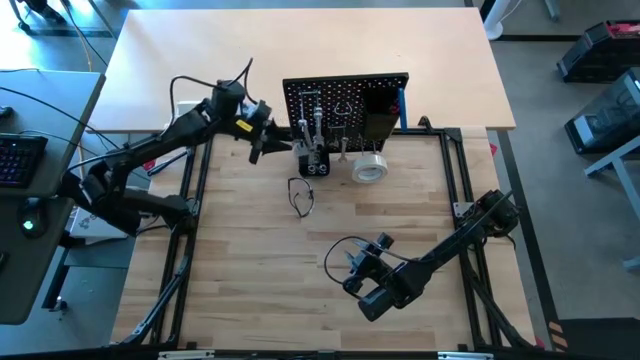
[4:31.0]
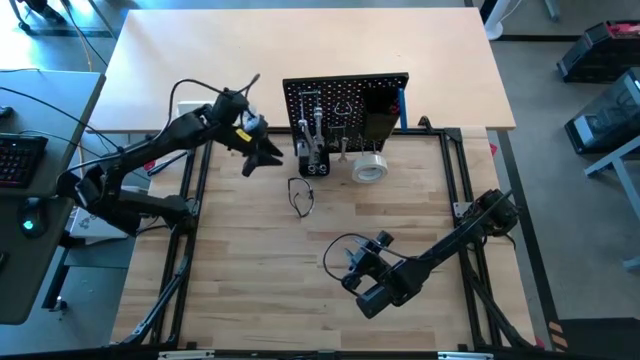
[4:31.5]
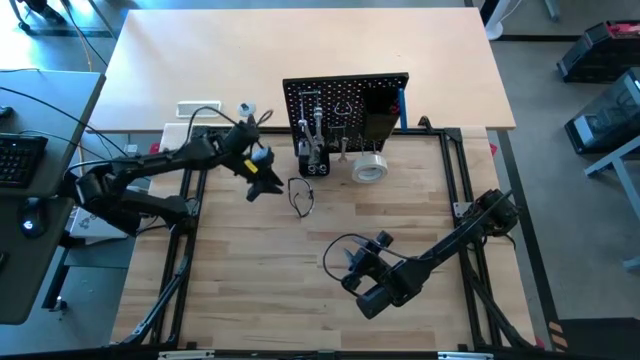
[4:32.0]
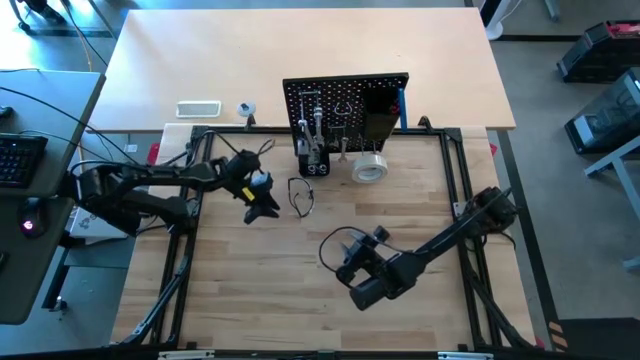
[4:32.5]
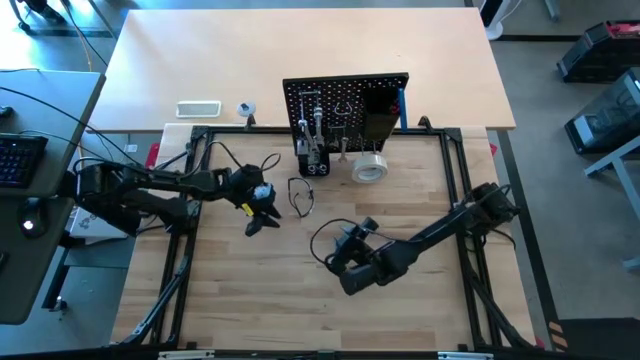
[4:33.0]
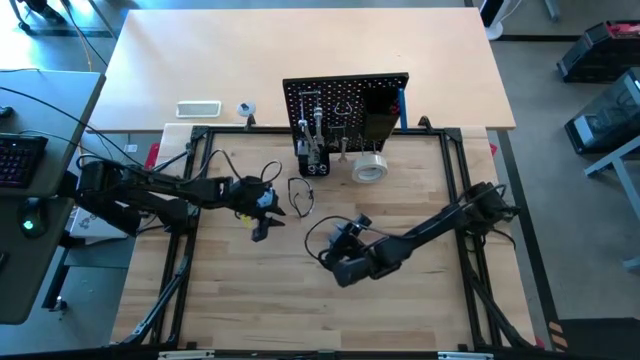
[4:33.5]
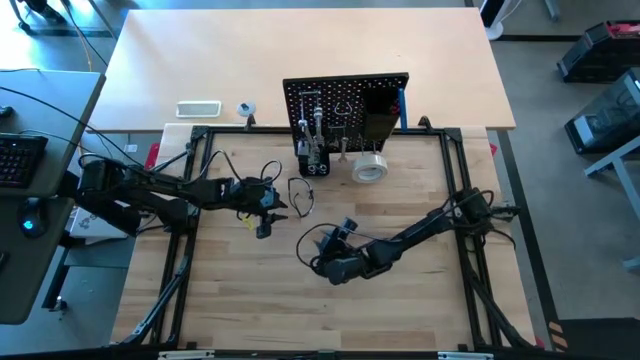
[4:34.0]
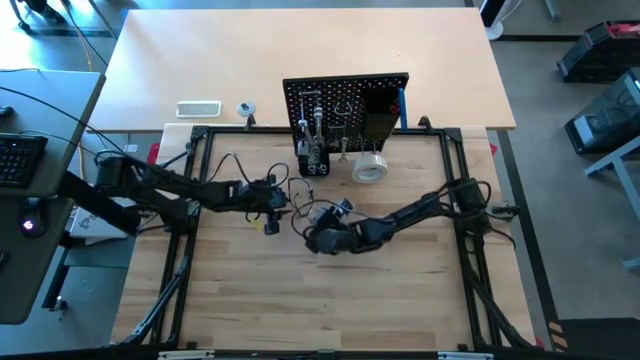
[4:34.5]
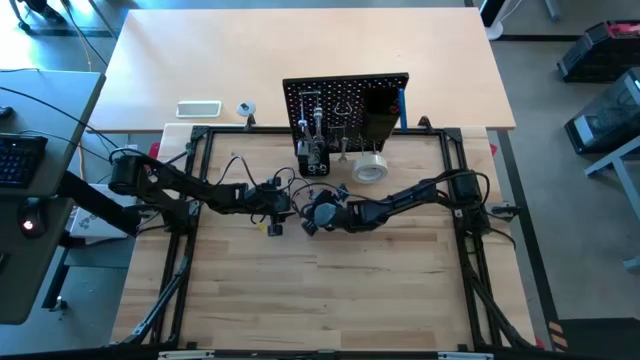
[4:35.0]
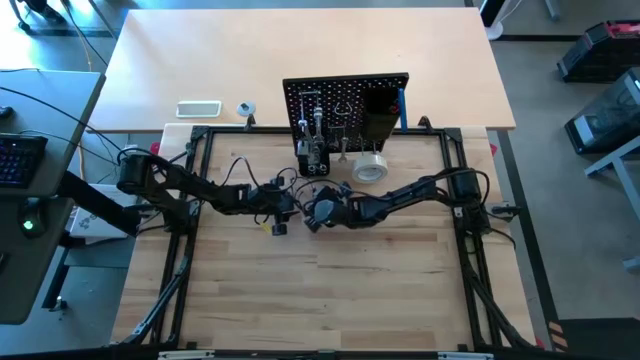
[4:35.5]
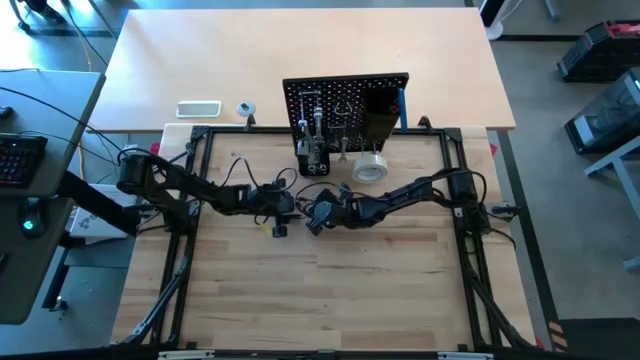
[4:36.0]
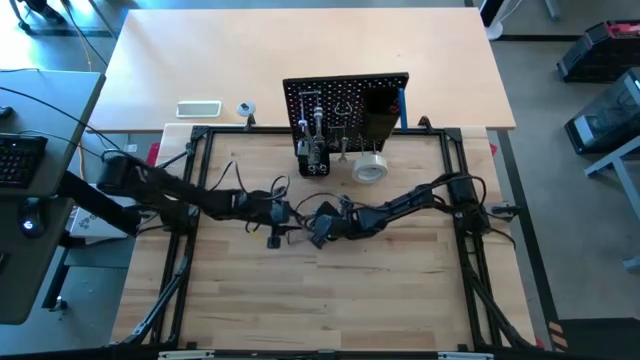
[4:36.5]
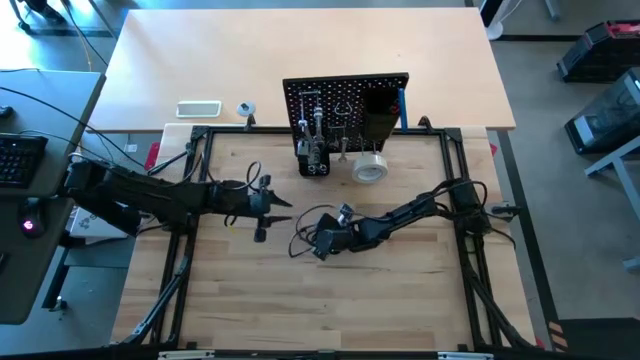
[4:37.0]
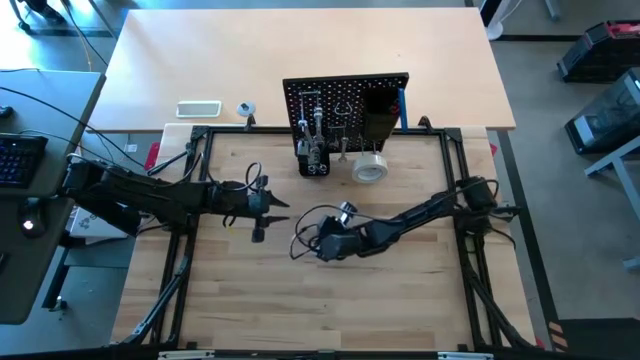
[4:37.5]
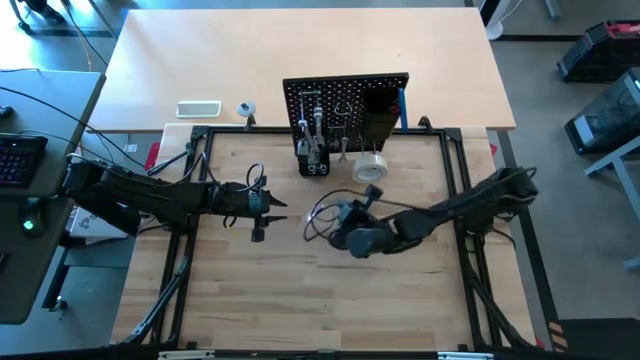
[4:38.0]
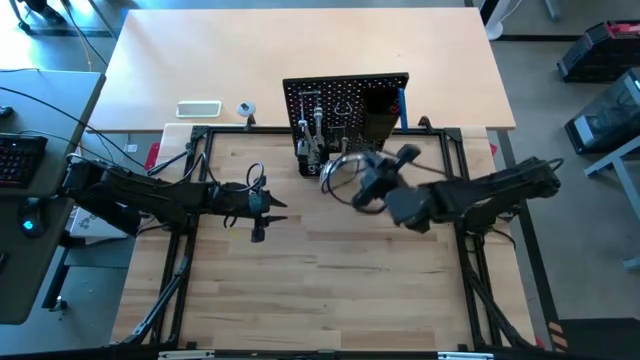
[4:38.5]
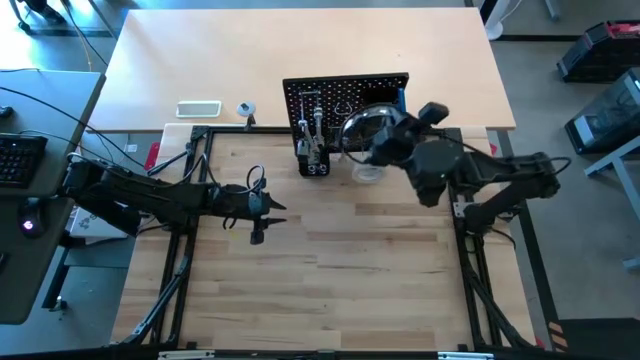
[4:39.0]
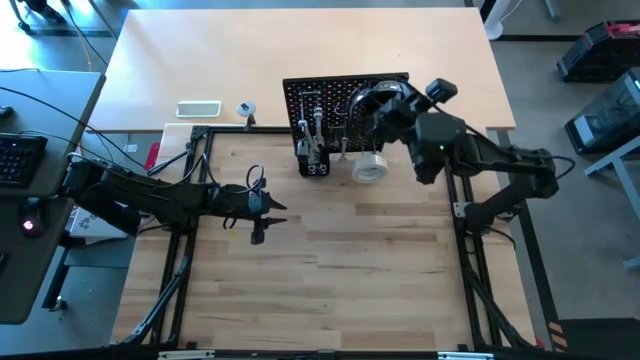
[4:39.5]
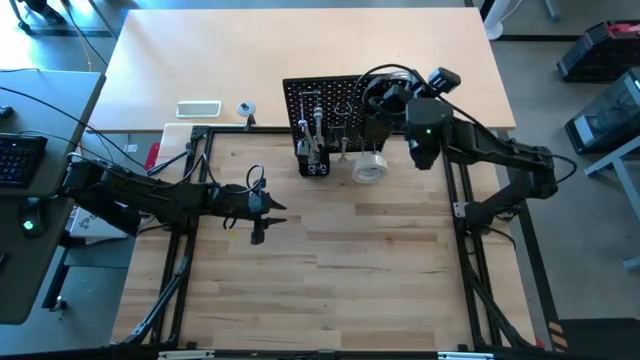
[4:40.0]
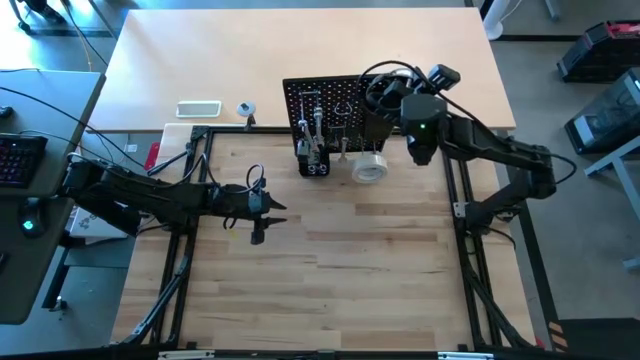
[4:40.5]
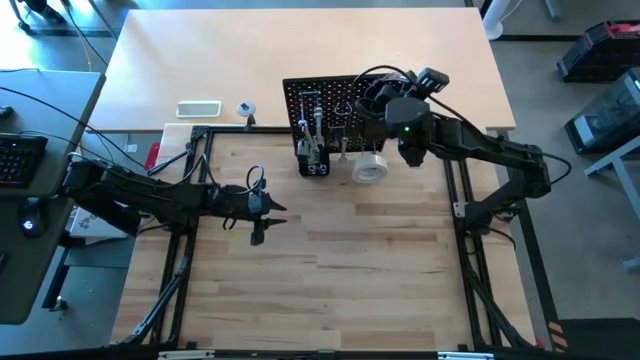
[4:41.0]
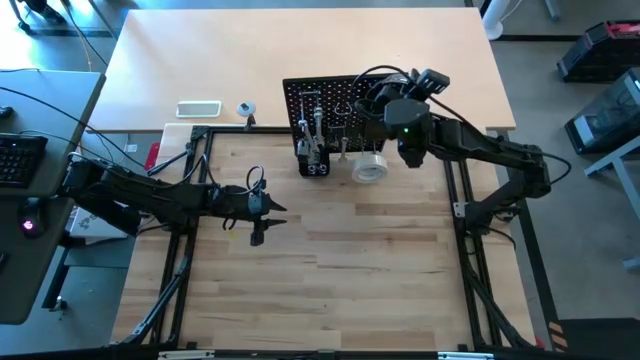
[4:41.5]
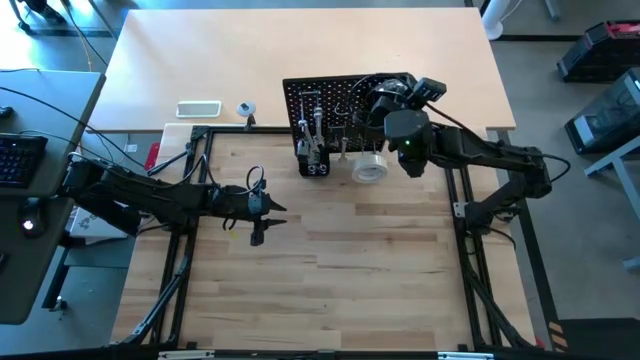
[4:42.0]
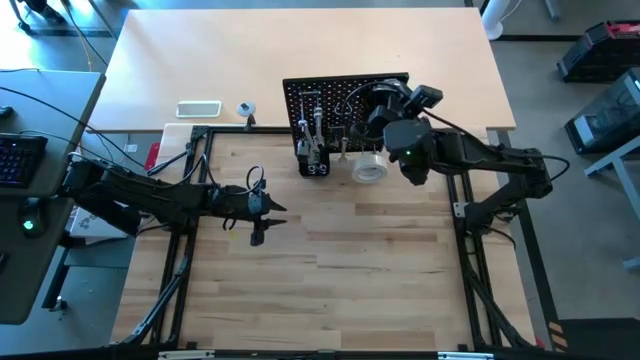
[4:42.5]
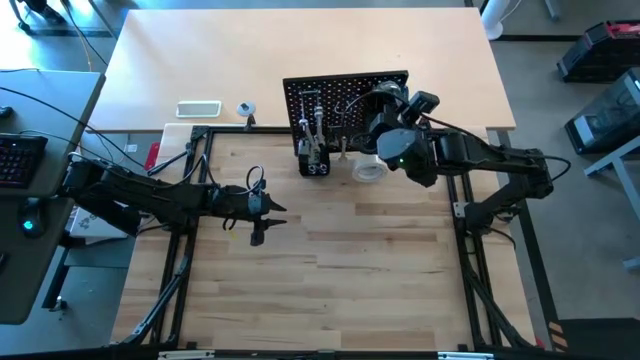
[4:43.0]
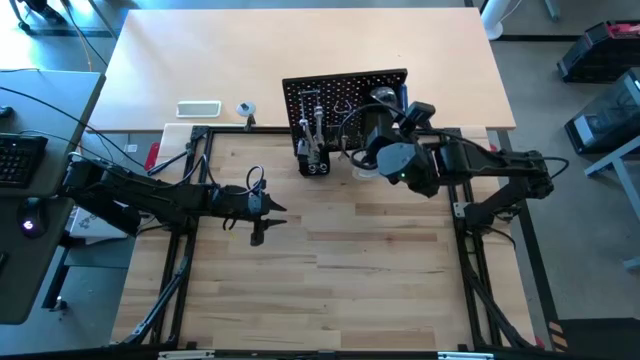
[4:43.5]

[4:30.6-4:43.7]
Task: Hang tools onto peg board
Put the safety glasses into the top black bin on the peg board

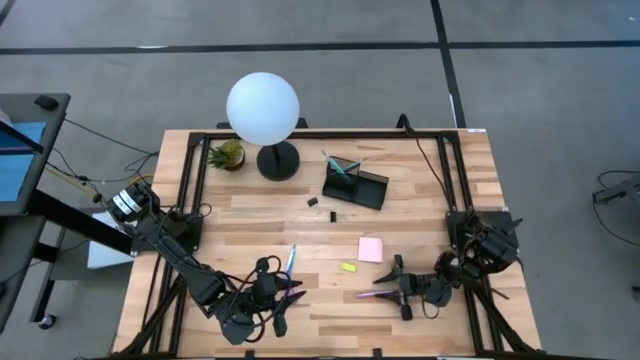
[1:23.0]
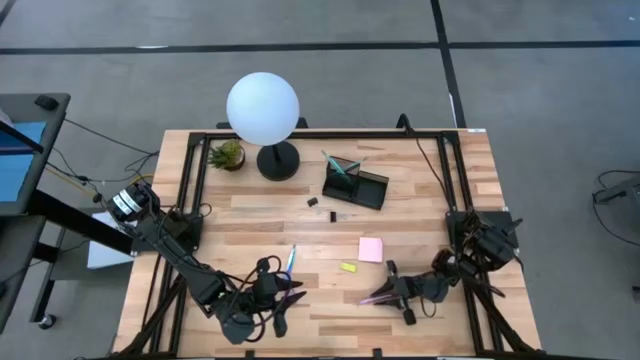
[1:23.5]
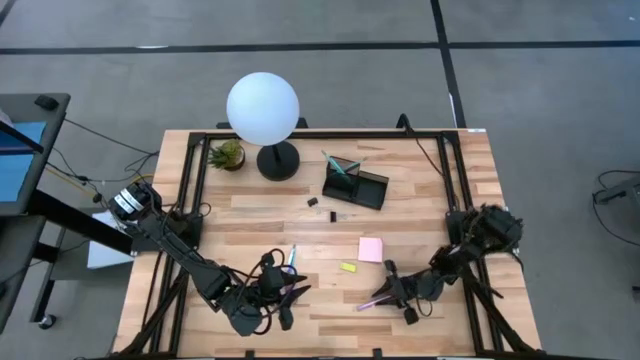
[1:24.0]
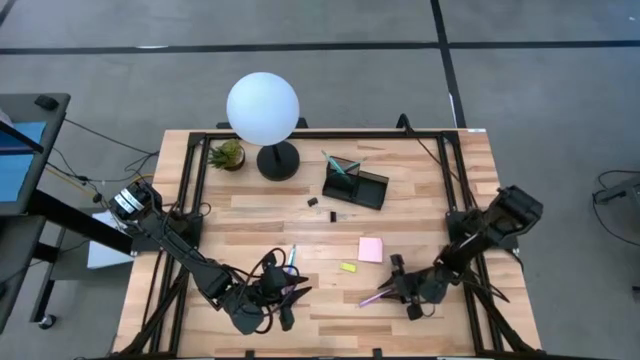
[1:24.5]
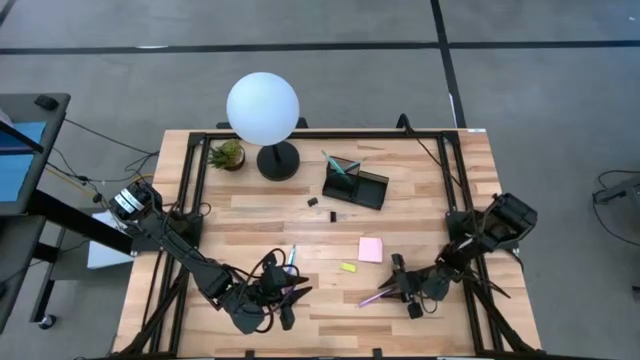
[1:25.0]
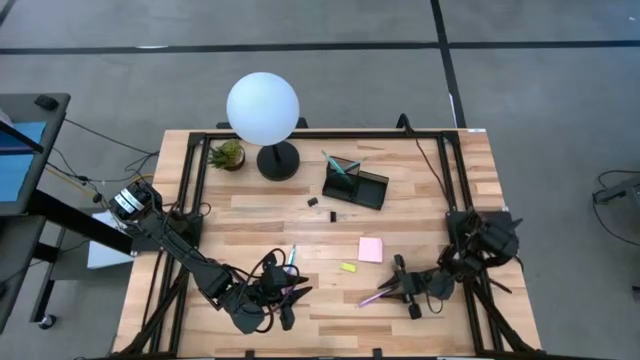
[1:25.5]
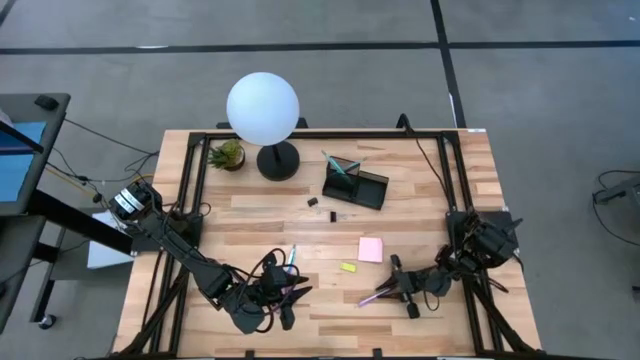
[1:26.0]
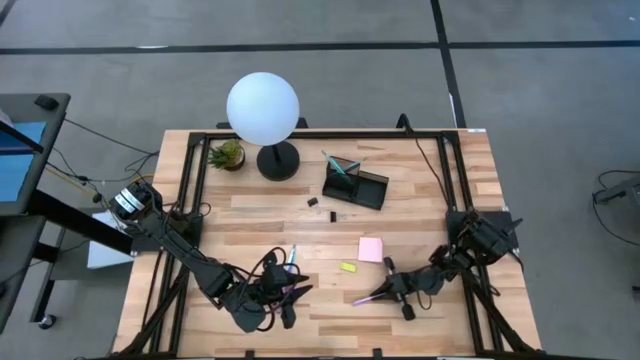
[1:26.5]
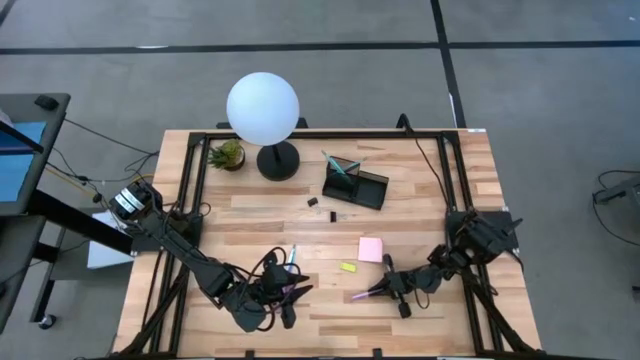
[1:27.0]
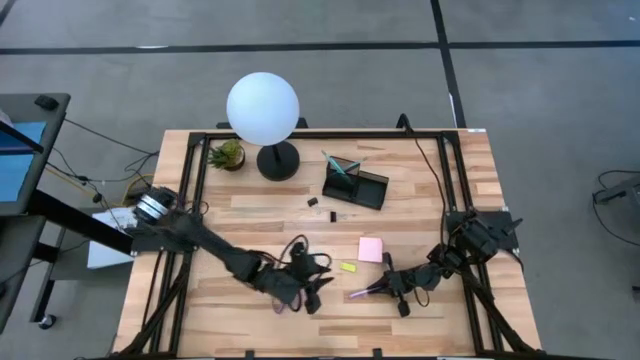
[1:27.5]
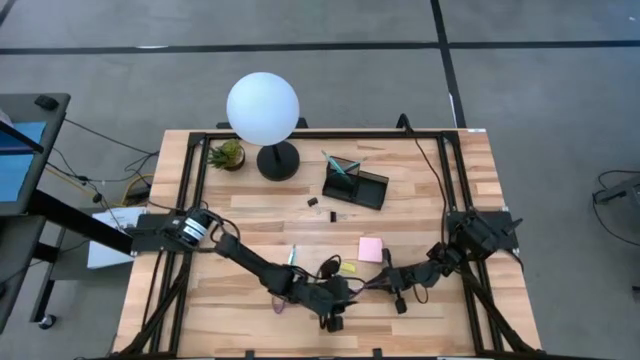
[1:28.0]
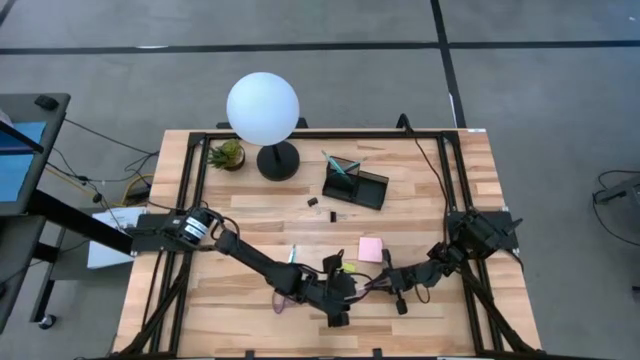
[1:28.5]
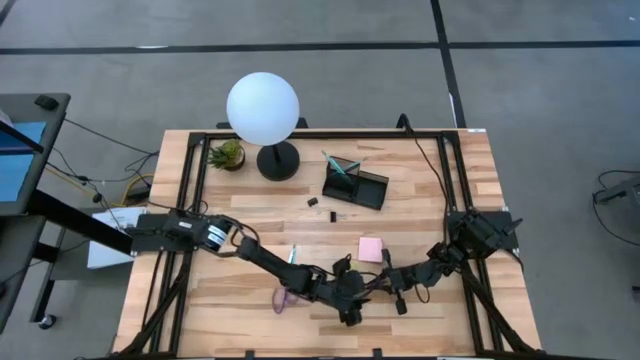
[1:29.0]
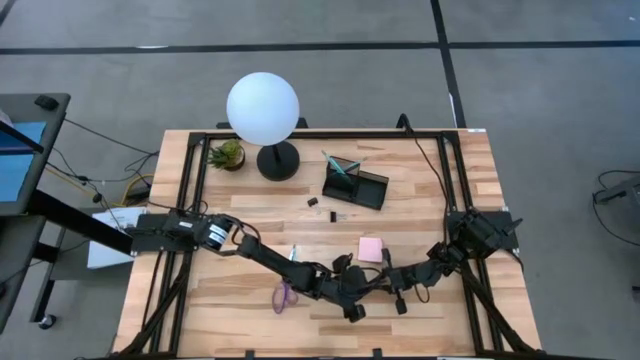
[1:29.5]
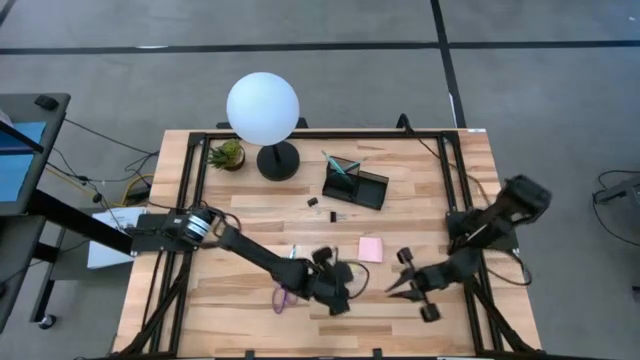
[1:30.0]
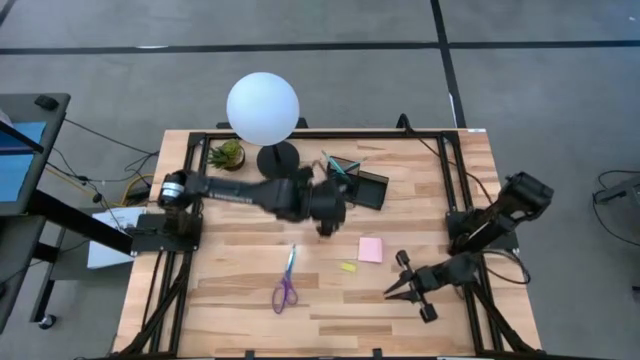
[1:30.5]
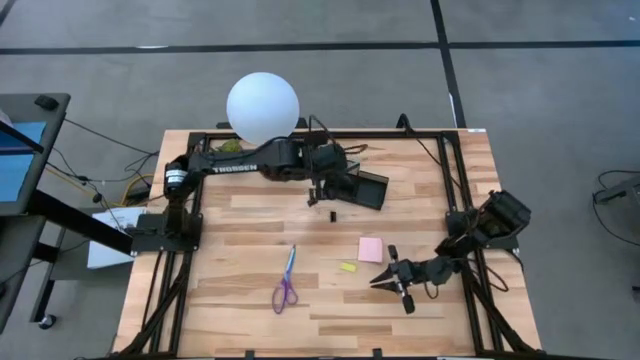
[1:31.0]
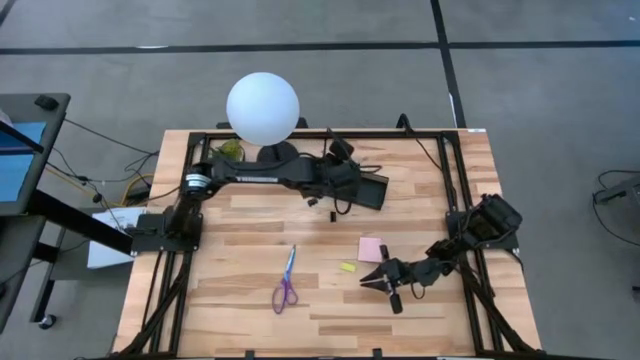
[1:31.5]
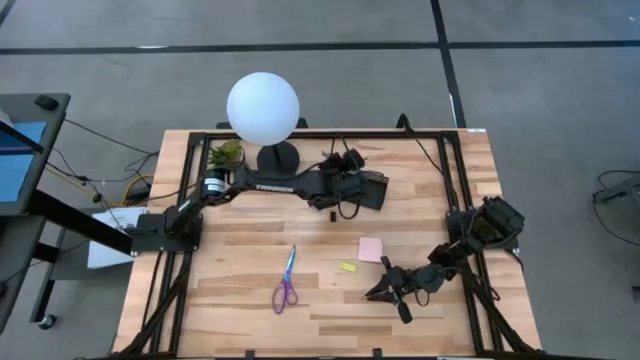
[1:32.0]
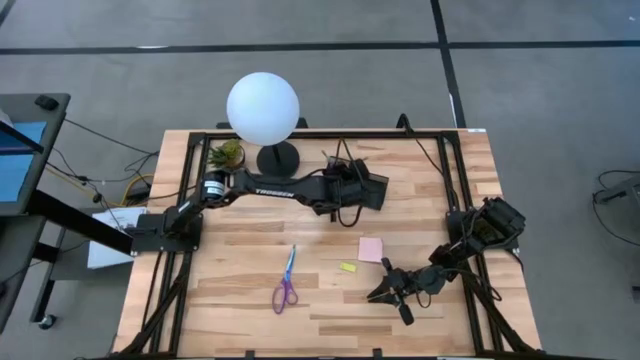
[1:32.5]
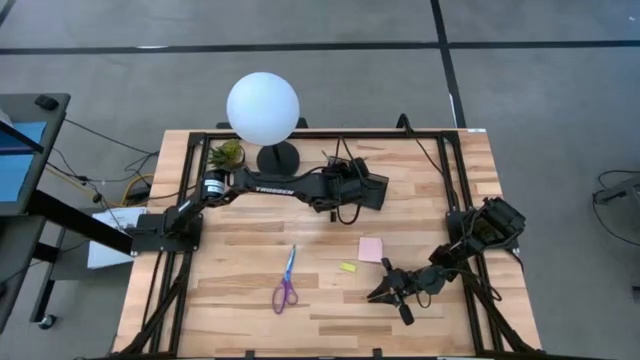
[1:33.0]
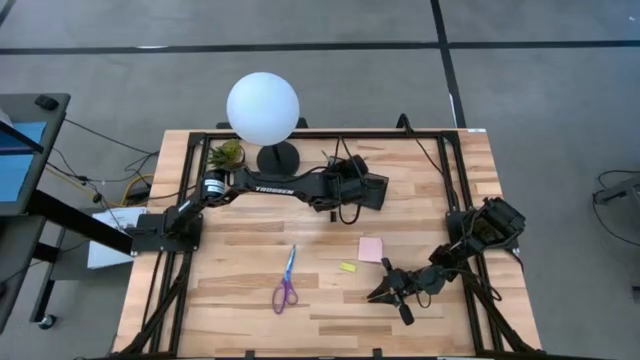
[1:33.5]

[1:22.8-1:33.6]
Task: Pick and place office supplies into organizer
Put the purple pen into the black desk organizer
